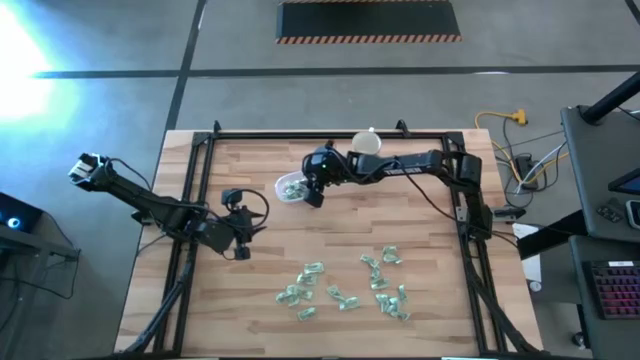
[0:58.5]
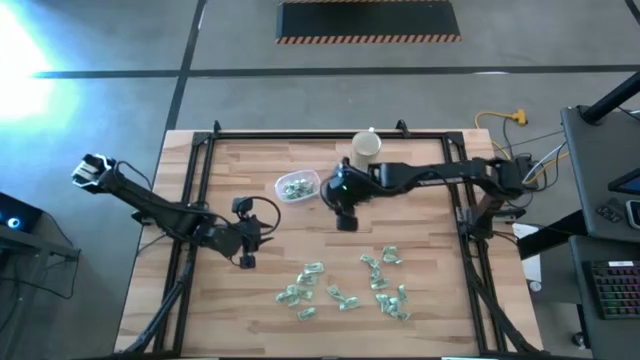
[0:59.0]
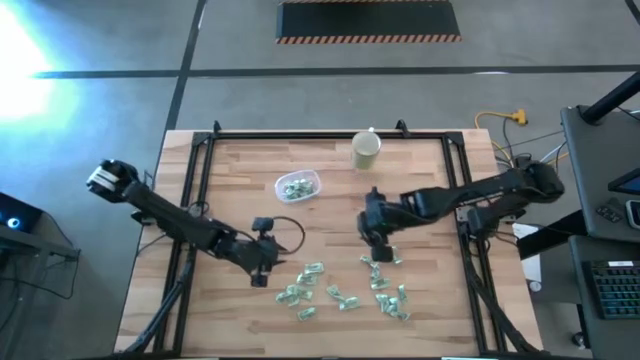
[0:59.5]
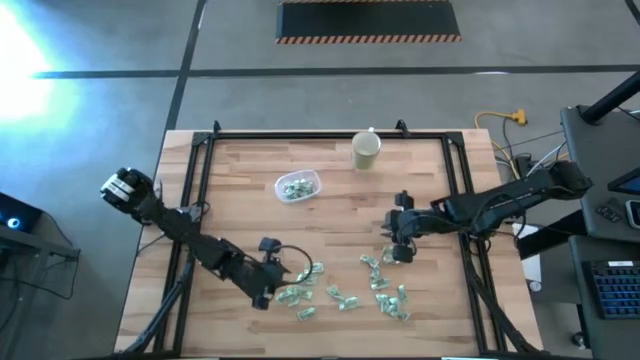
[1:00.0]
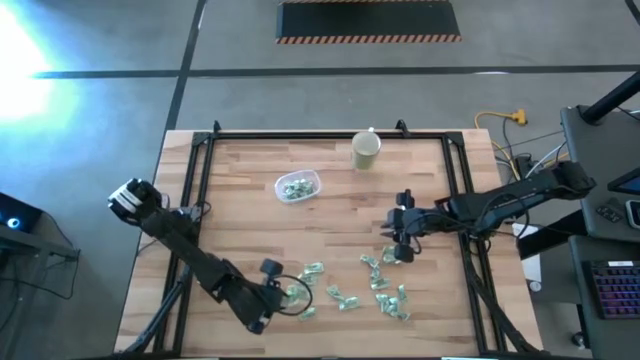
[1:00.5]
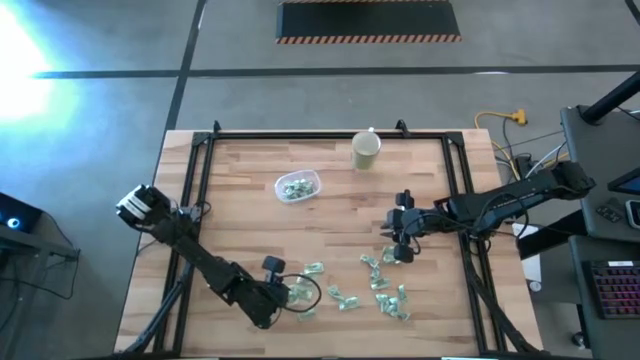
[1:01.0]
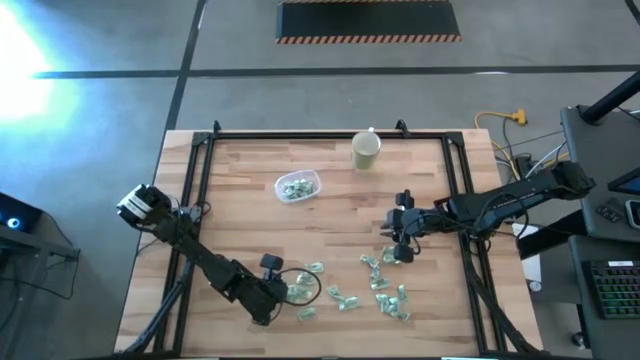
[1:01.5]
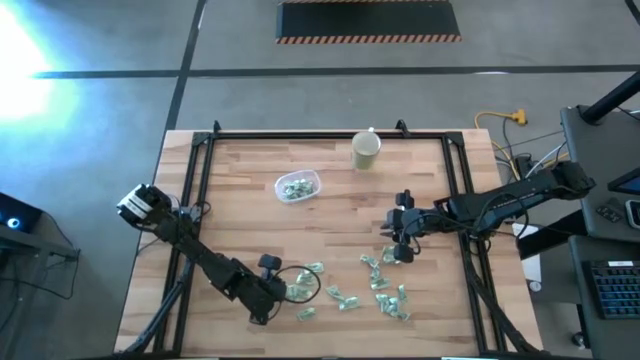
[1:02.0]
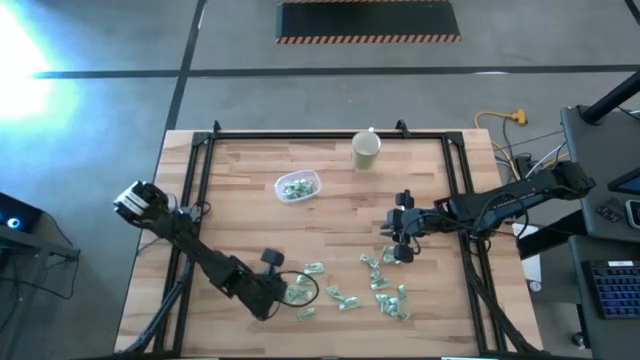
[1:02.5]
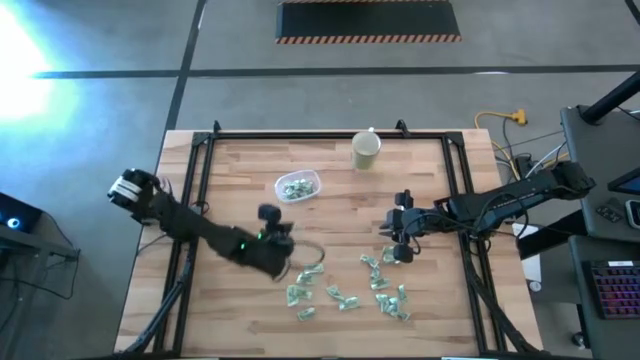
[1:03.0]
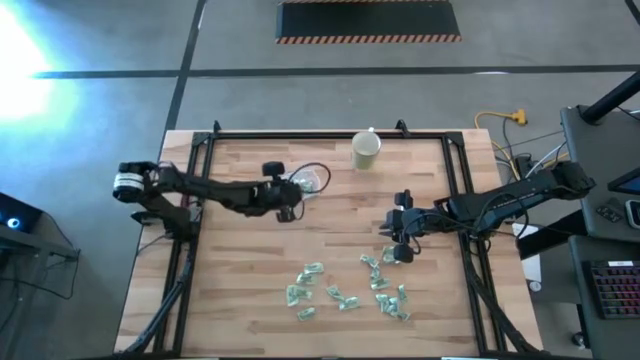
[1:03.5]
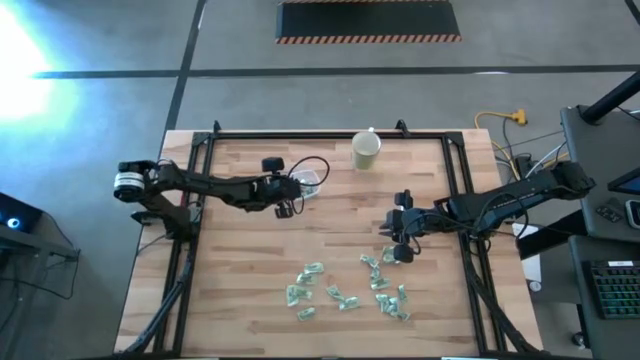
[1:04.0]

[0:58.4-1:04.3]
Task: Pick and place Stevia / Truvia into bins
Put the stevia packet into the transparent container

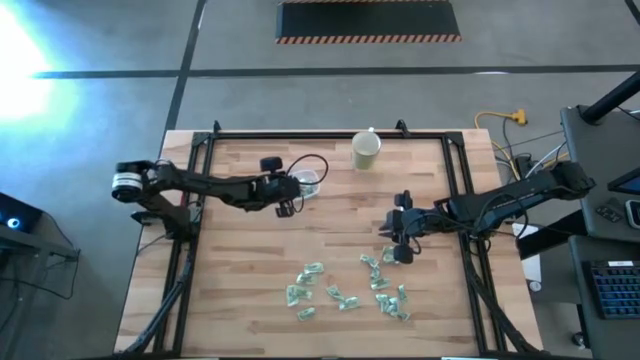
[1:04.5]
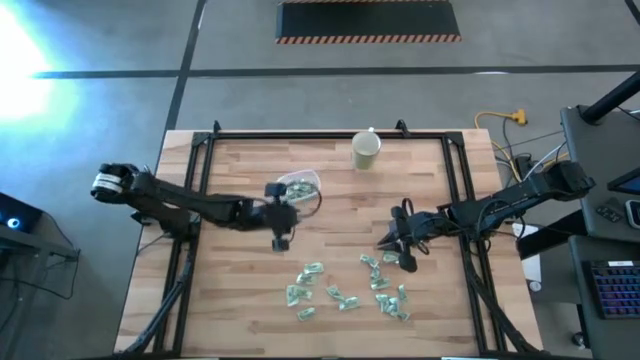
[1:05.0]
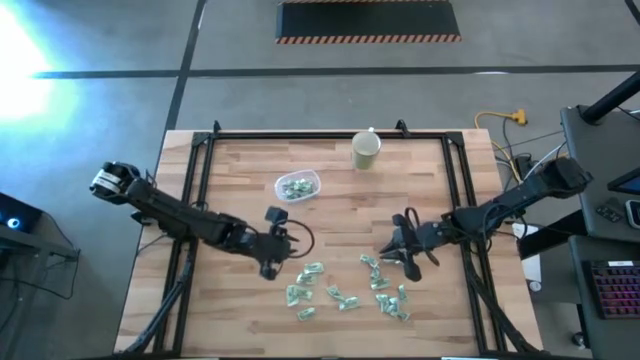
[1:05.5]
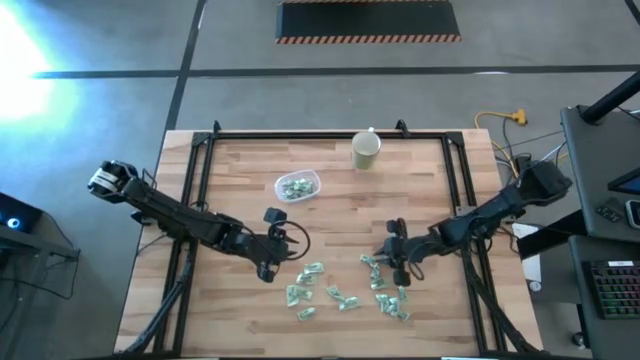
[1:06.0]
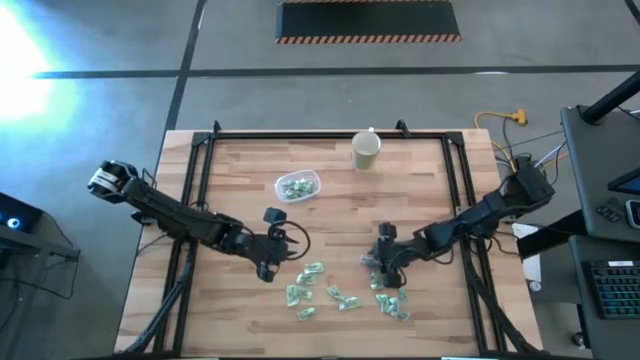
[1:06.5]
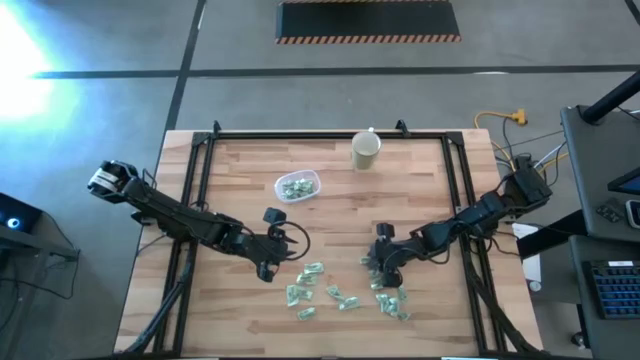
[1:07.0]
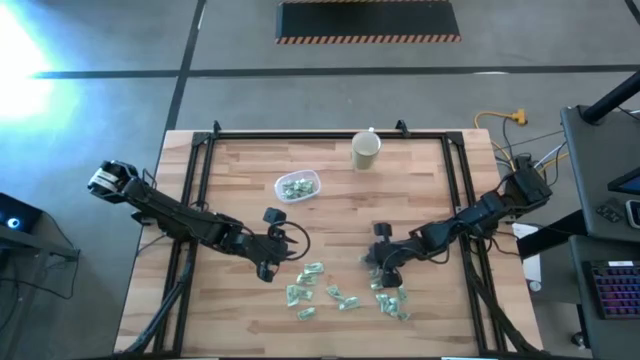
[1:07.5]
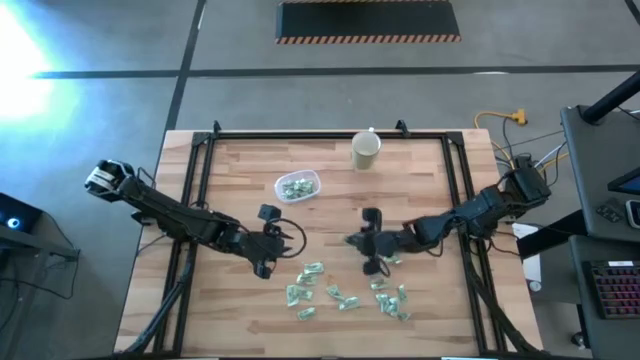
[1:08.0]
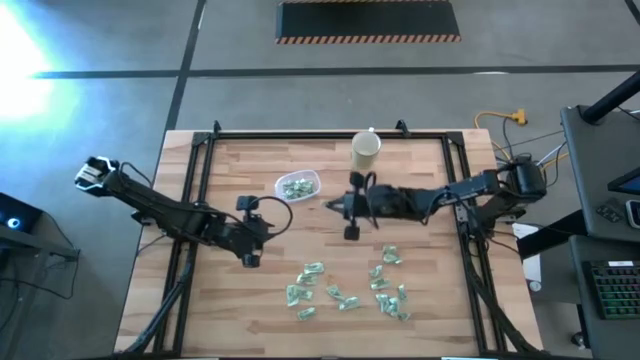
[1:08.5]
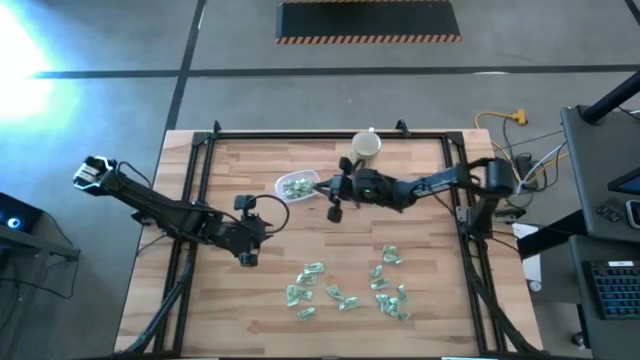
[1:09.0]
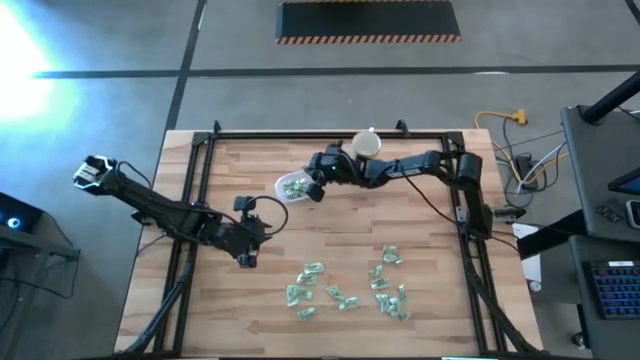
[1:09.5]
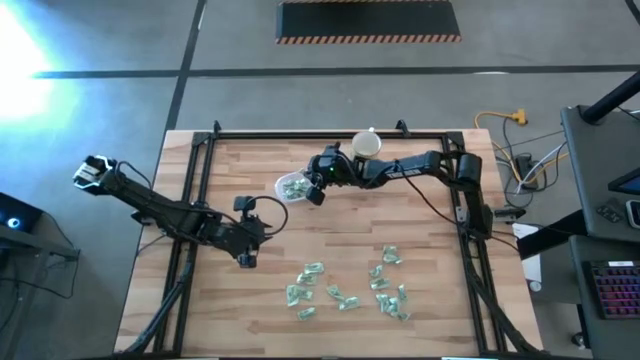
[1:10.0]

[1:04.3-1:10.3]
Put the stevia packet into the transparent container

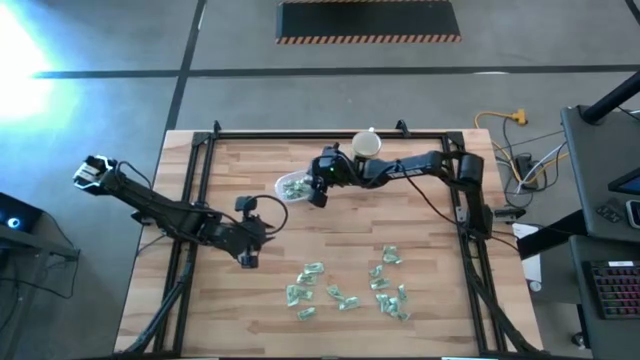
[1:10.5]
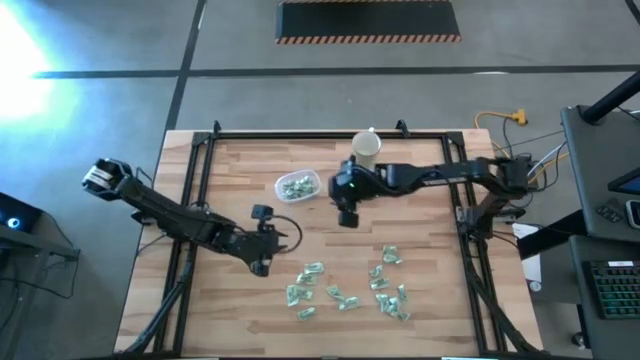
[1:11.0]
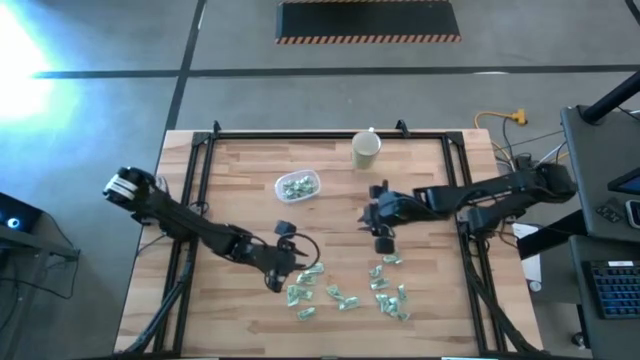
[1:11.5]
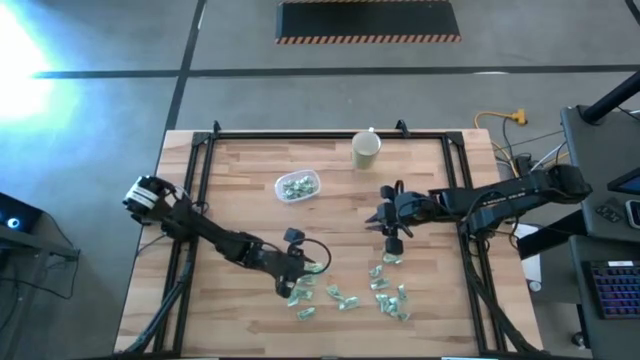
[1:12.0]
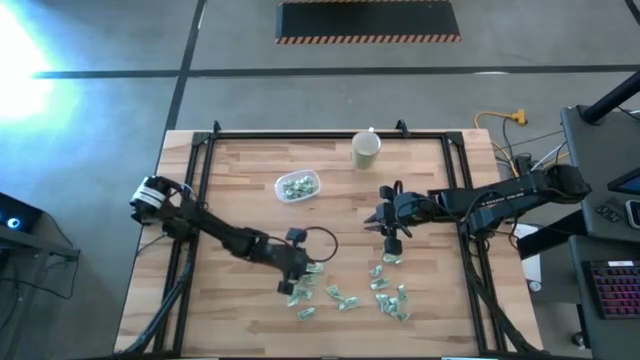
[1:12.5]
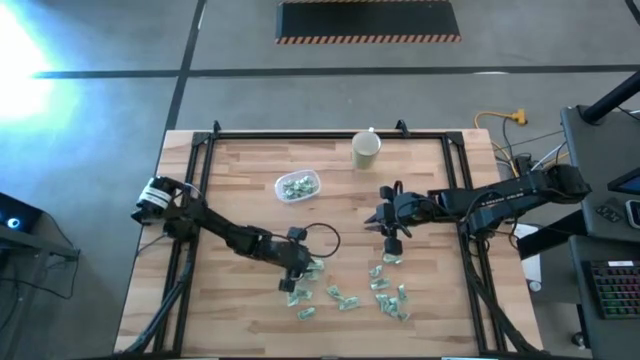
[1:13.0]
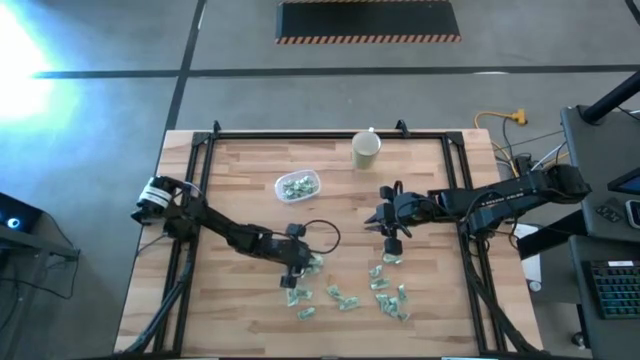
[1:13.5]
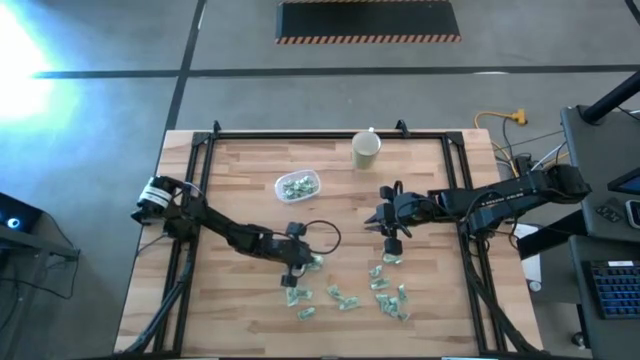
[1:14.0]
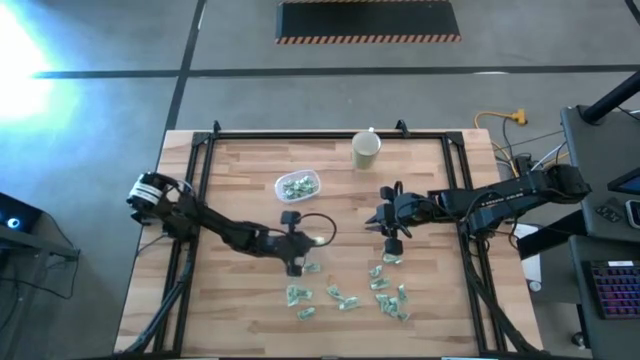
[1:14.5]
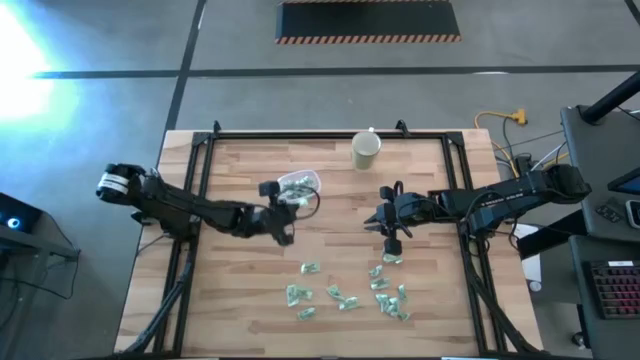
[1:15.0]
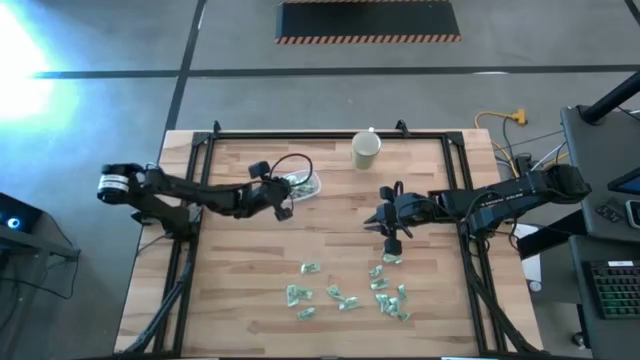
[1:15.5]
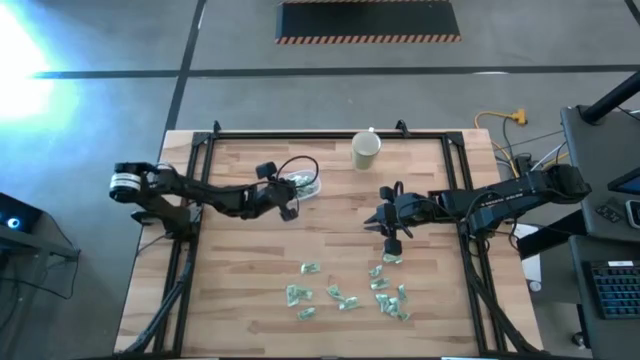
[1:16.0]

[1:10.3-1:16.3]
Put the stevia packet into the transparent container

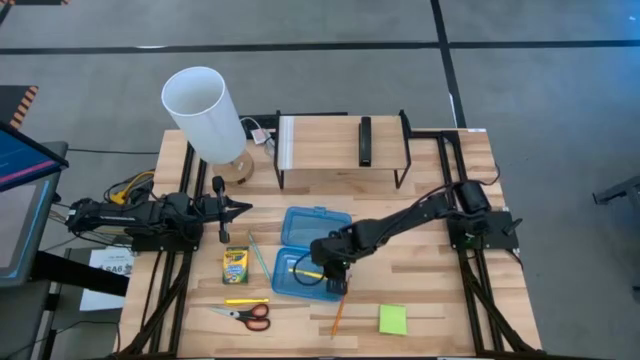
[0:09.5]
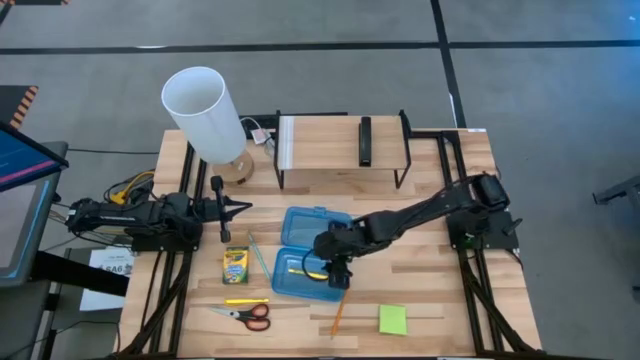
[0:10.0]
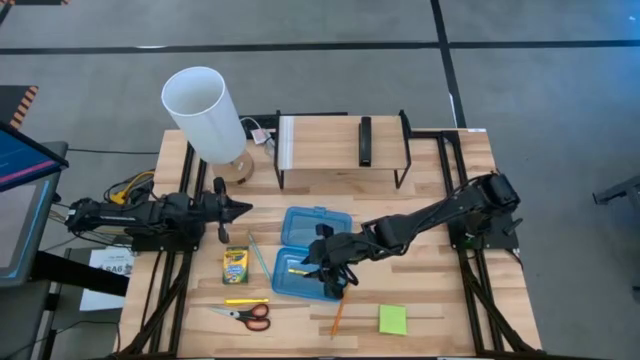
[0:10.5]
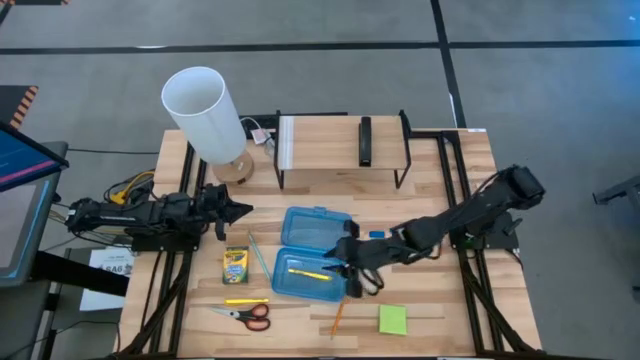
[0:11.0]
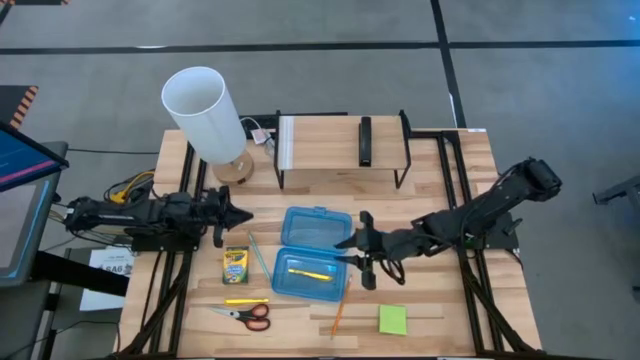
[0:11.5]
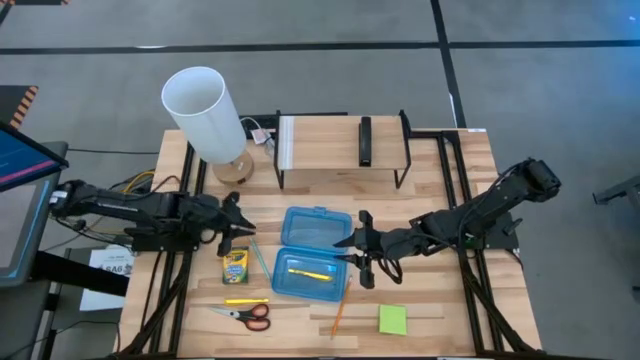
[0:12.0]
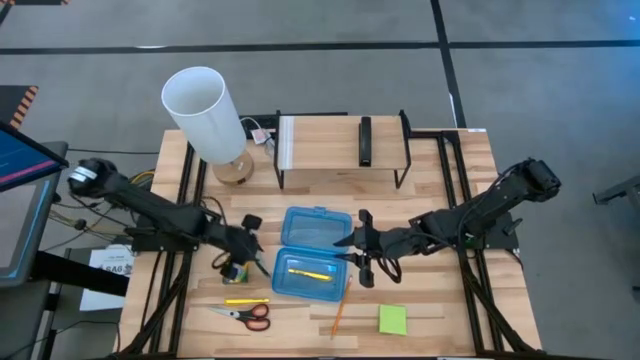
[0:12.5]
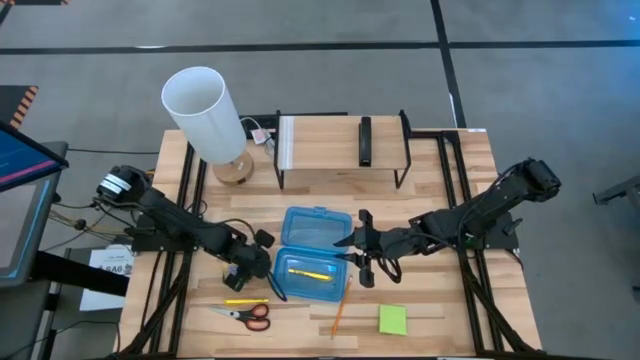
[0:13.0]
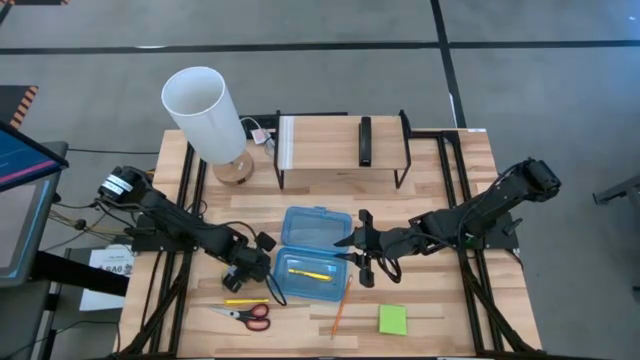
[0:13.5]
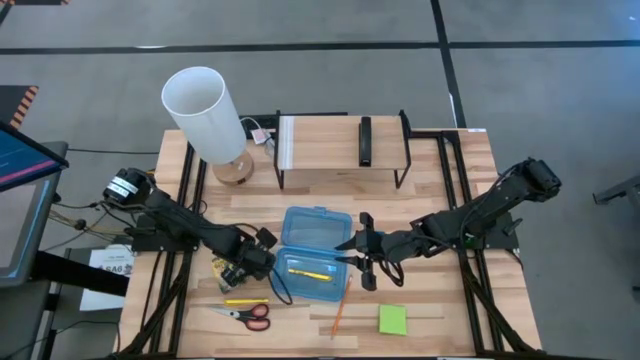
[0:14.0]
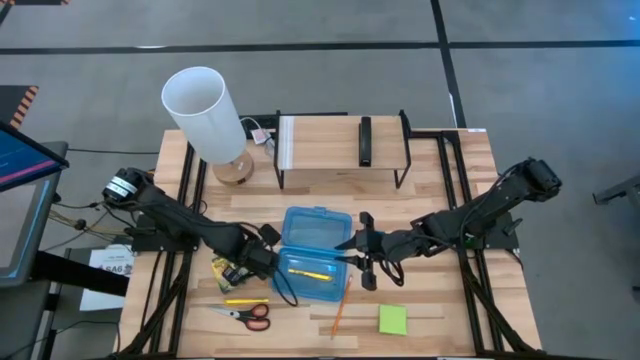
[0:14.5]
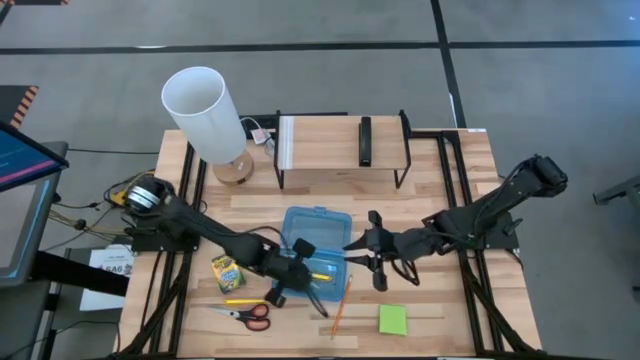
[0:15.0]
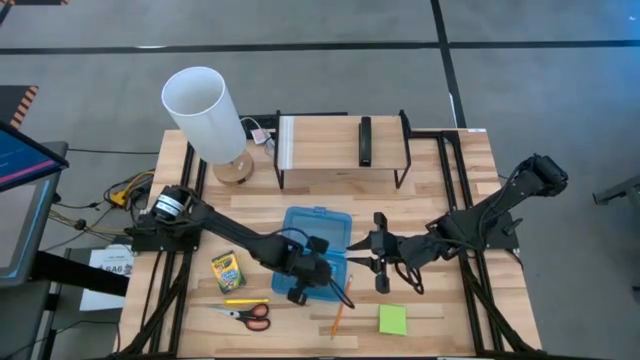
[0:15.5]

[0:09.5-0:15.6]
Task: Pack school essentials
Put the light blue pencil into the blue supply box
